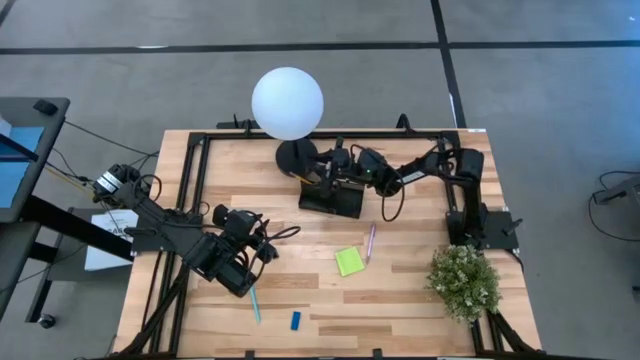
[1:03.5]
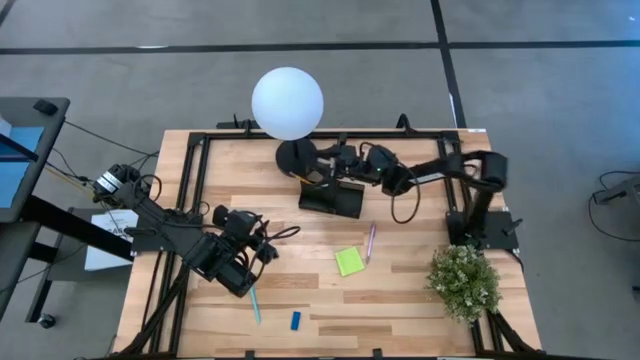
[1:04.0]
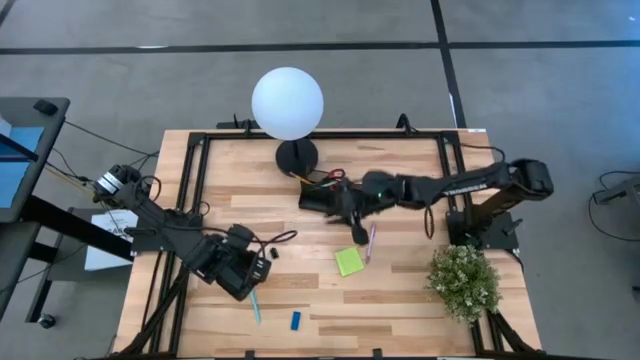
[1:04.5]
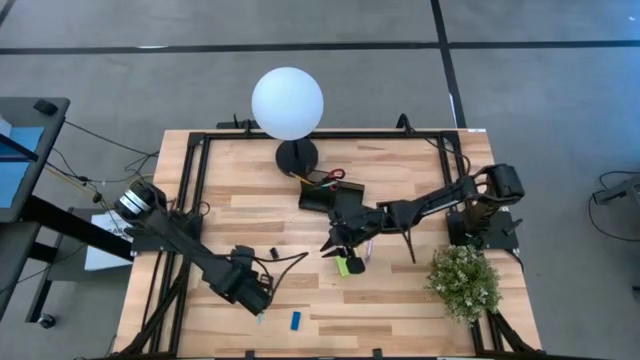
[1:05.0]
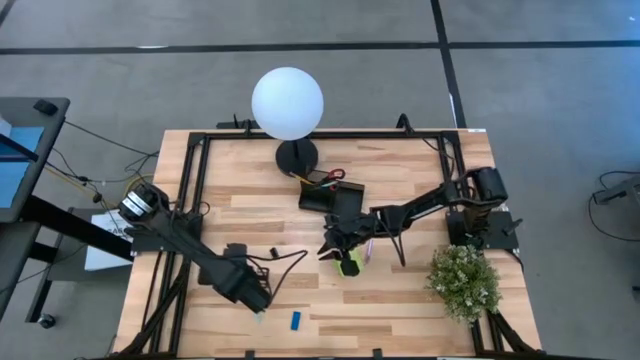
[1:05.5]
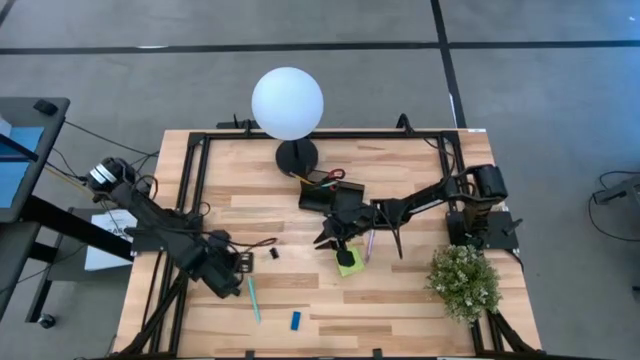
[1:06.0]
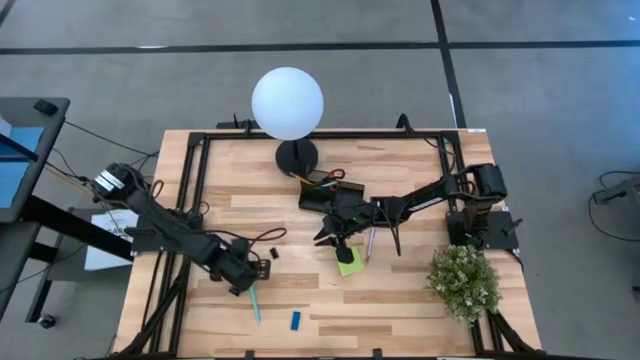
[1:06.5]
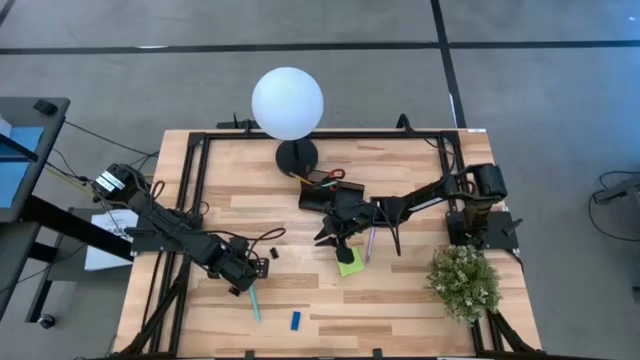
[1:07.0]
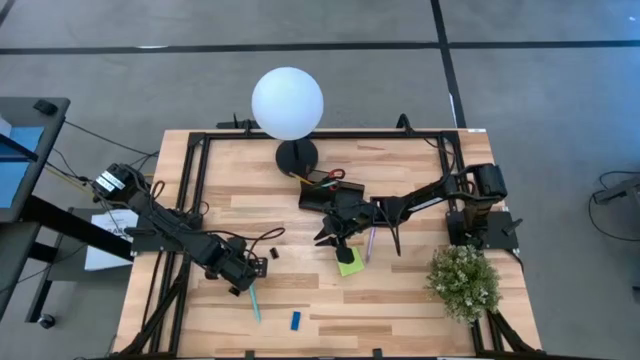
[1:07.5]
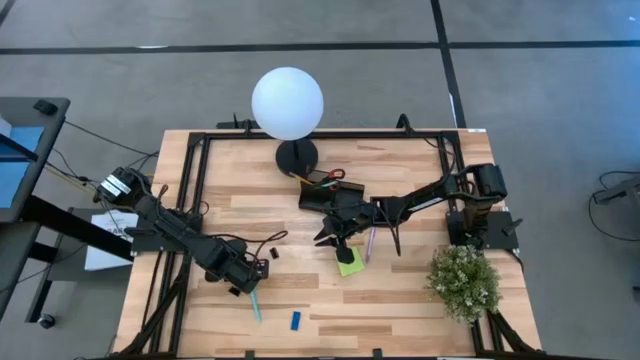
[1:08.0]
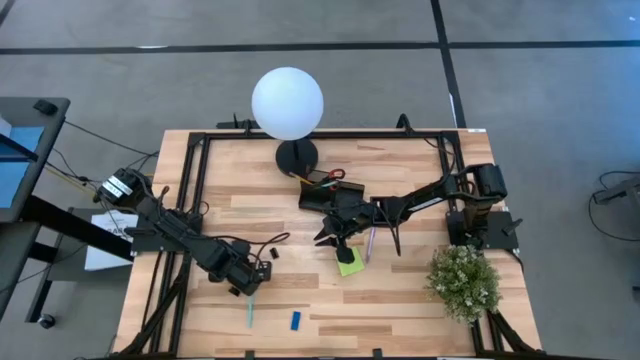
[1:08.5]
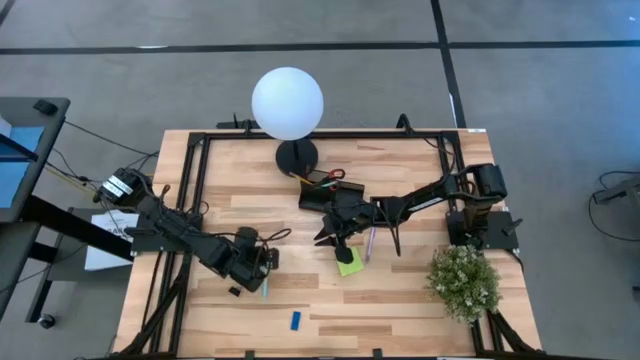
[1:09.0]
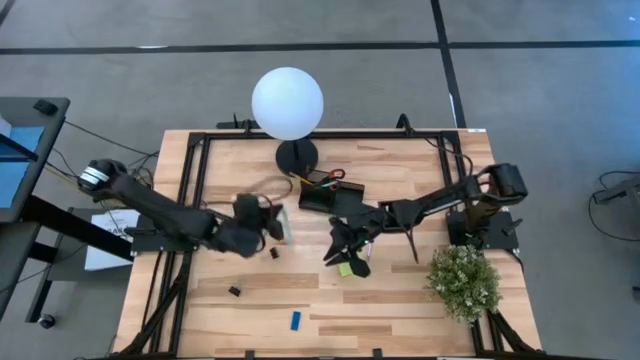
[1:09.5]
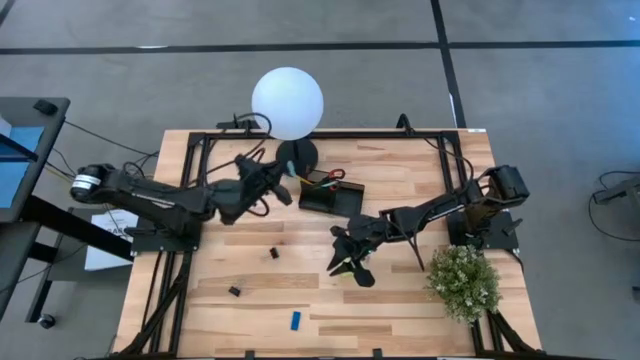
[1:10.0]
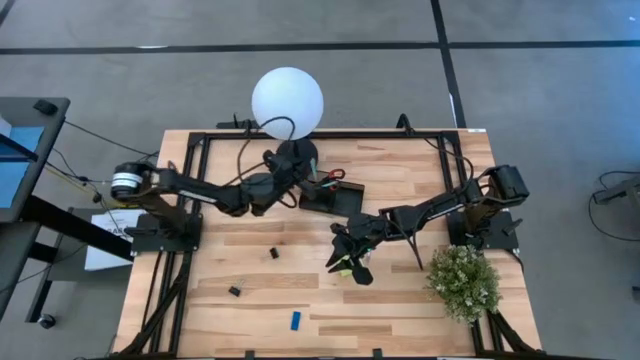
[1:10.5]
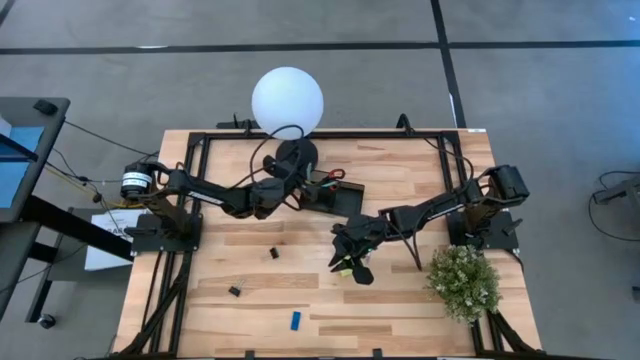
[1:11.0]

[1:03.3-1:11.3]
Task: Pick and place office supplies into organizer
Put the light blue mechanical pencil into the desk organizer

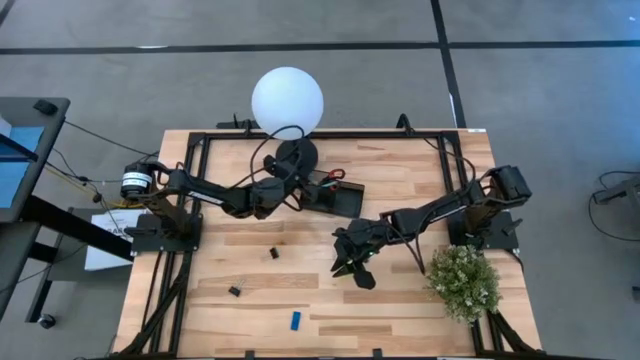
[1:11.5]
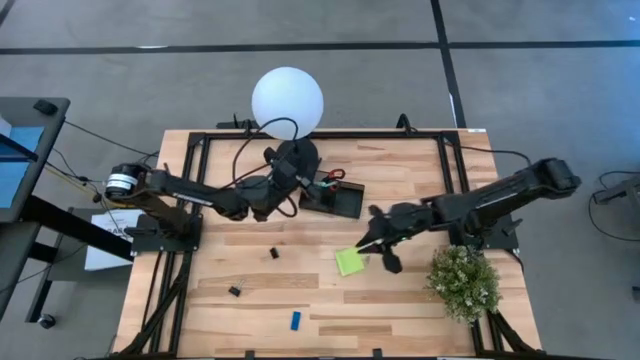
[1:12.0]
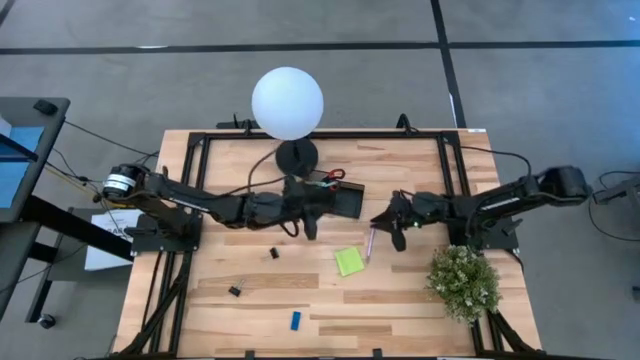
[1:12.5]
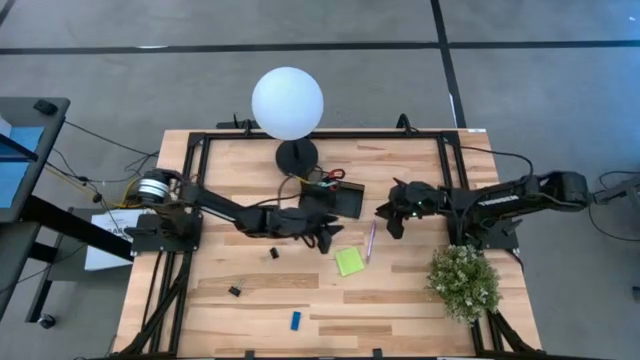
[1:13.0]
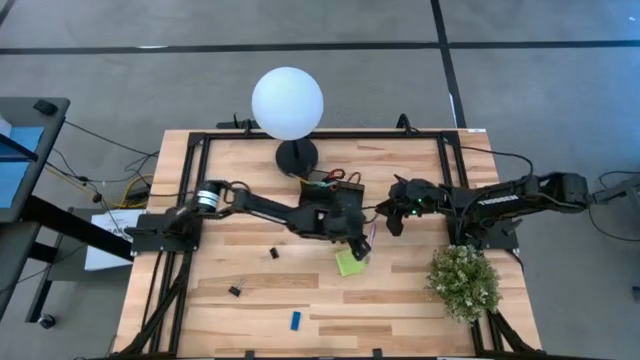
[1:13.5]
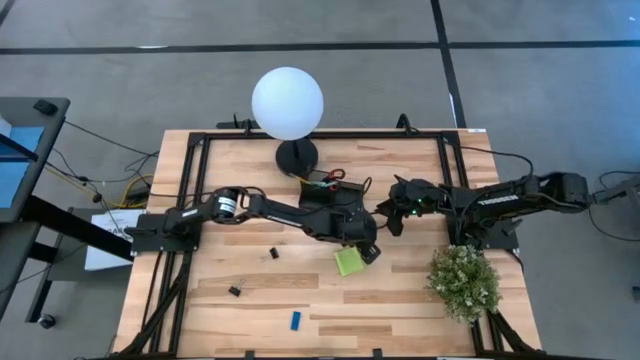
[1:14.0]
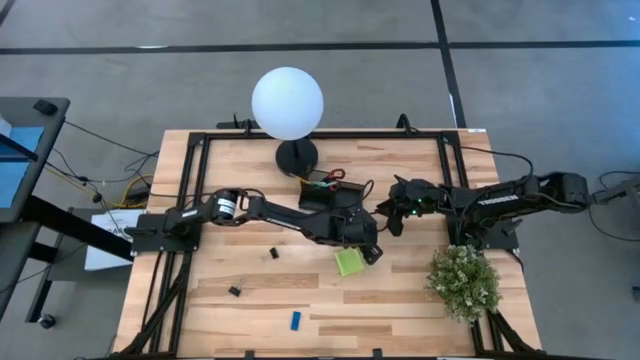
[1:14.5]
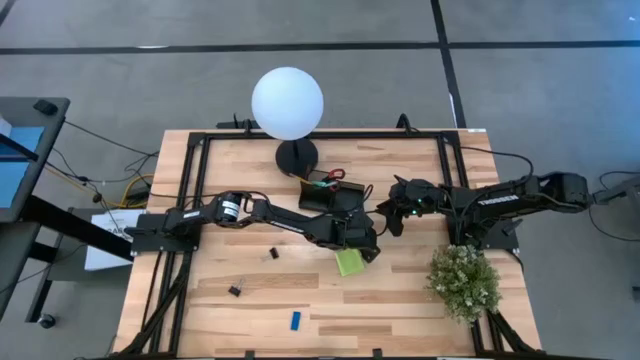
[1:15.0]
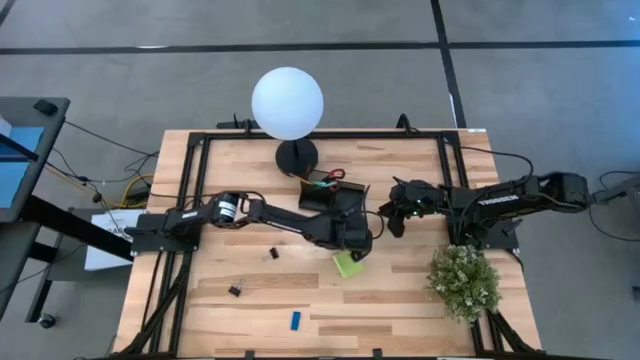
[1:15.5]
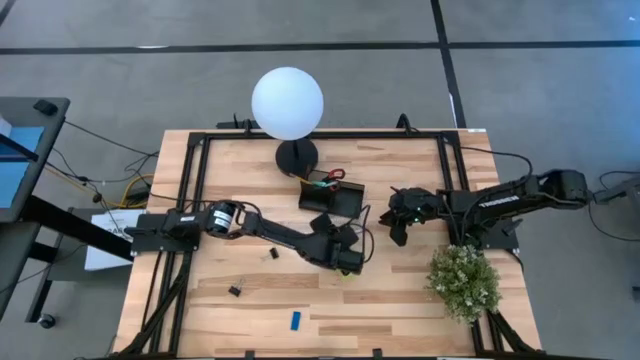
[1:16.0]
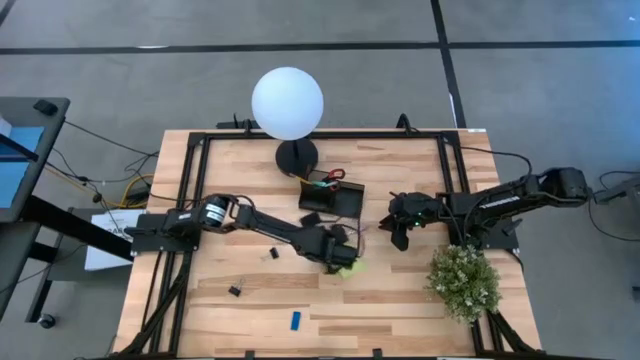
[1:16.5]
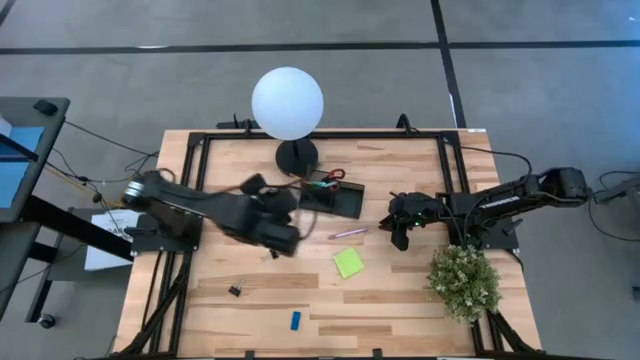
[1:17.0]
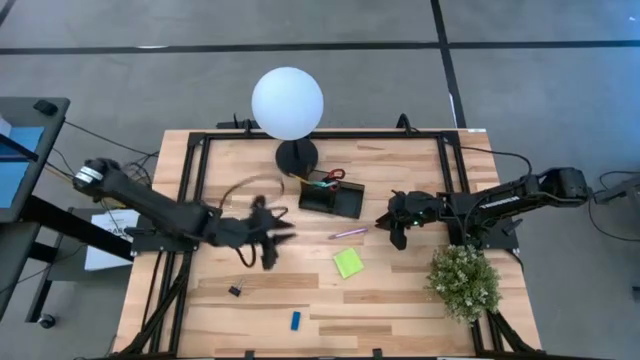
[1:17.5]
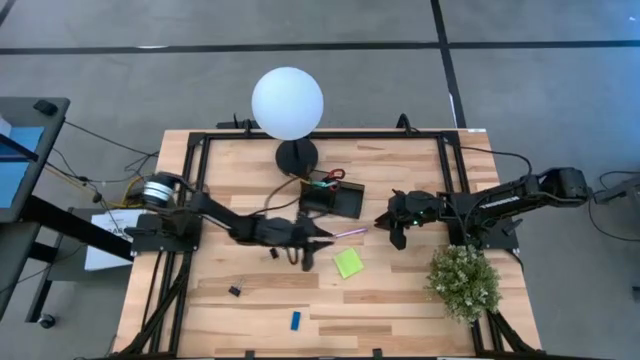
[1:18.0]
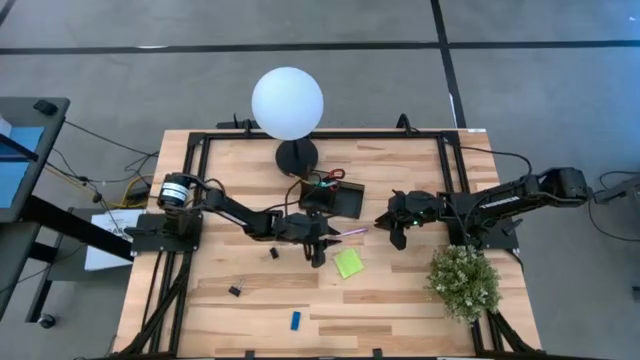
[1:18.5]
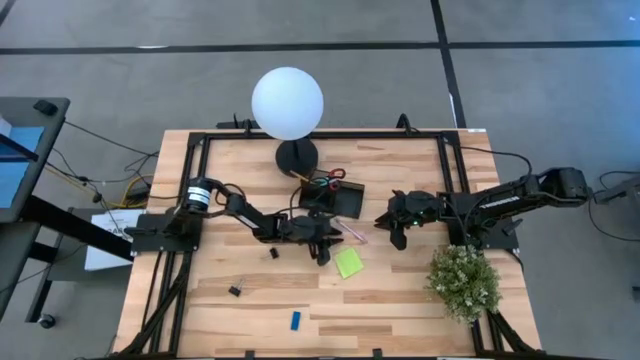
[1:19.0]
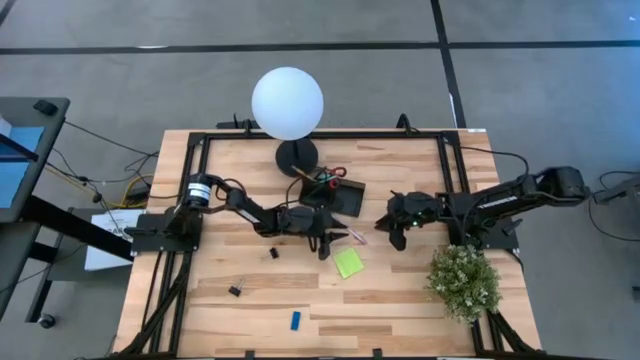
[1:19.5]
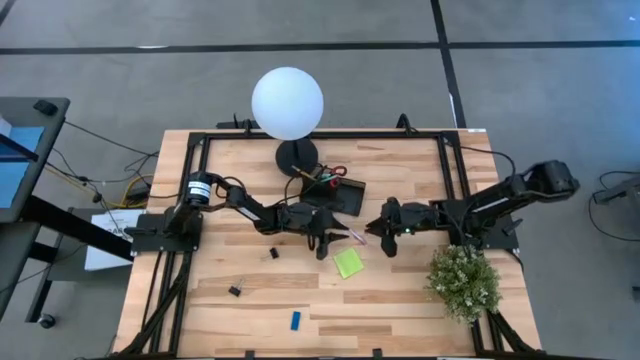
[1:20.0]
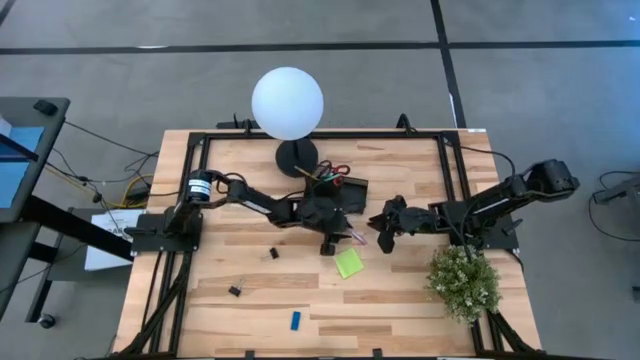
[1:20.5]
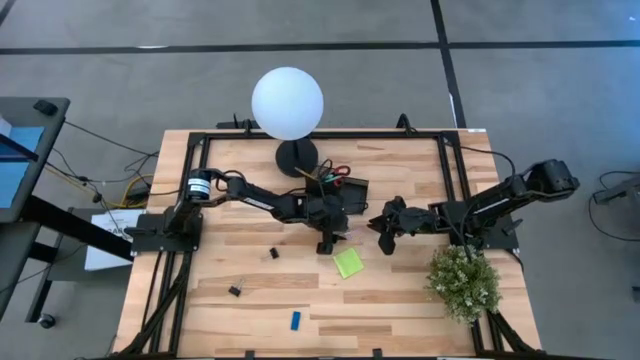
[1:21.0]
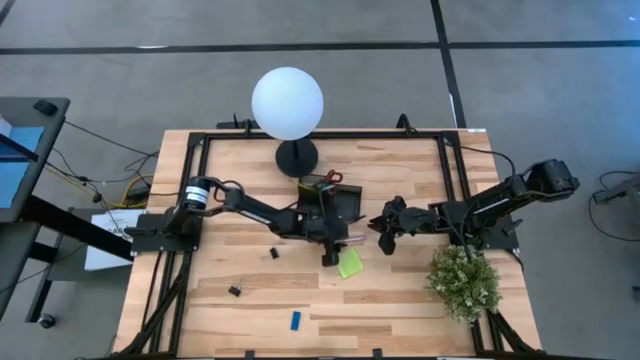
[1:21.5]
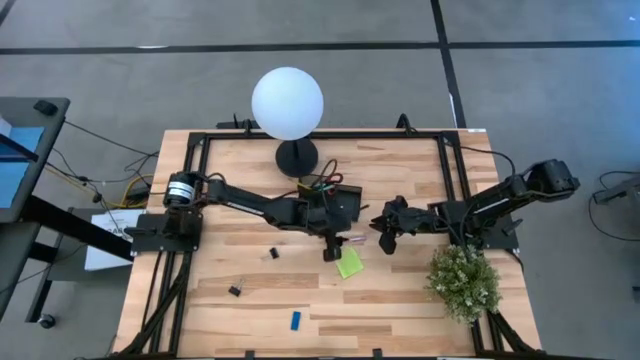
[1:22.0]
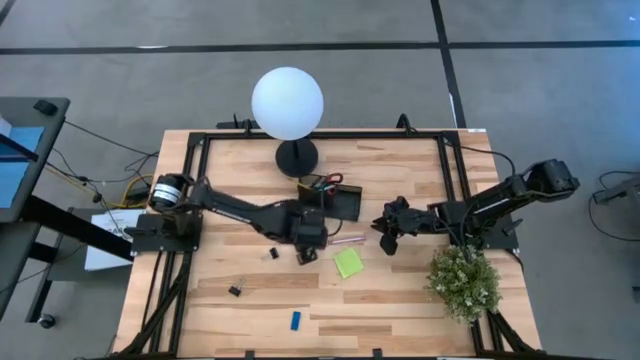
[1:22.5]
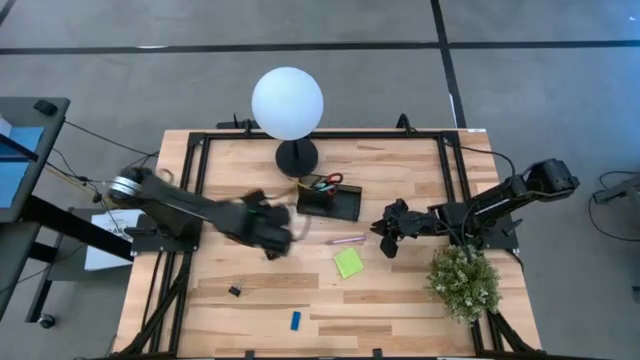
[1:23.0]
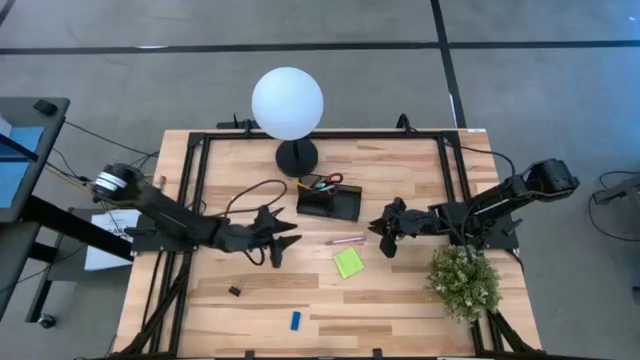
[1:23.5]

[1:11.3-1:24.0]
Put the purple mechanical pencil into the desk organizer

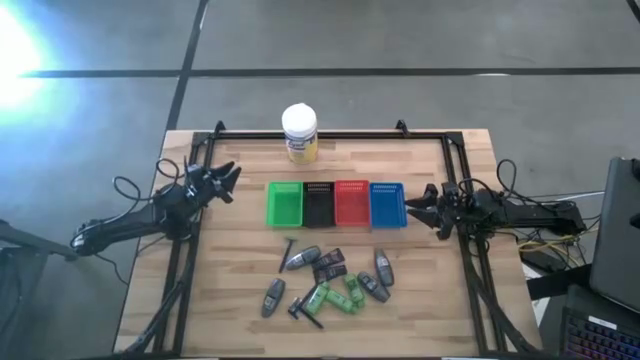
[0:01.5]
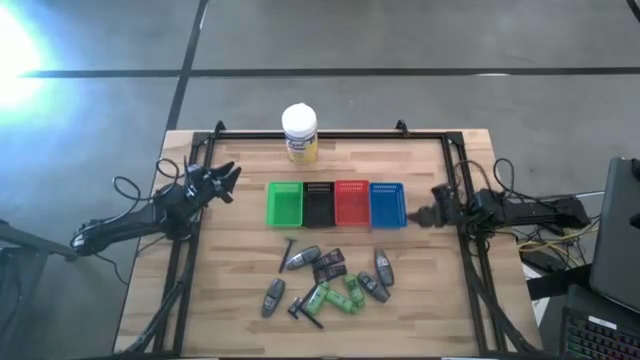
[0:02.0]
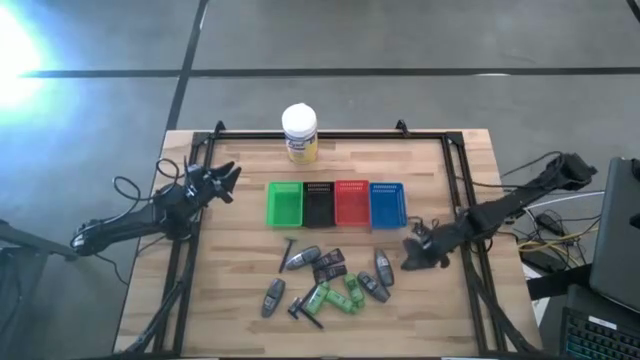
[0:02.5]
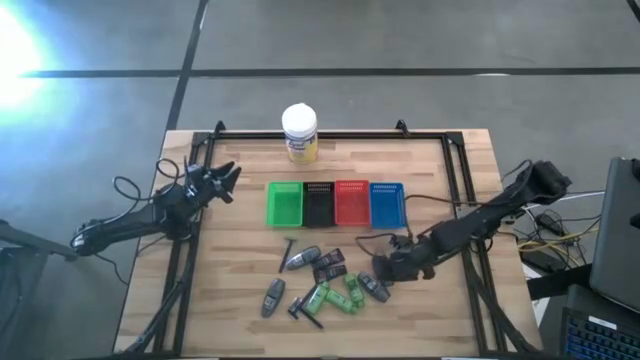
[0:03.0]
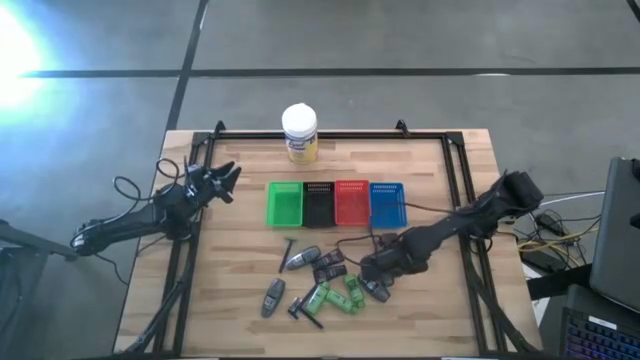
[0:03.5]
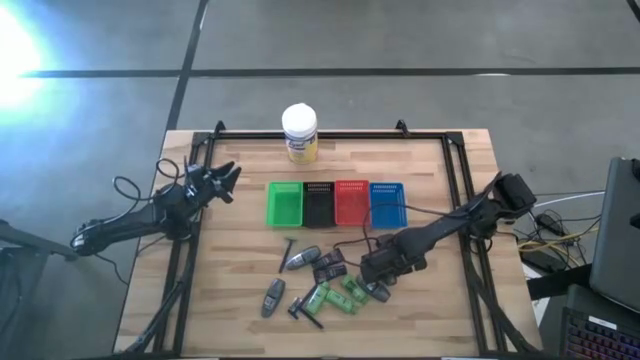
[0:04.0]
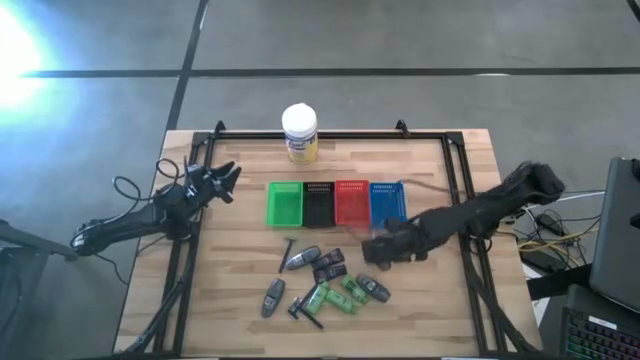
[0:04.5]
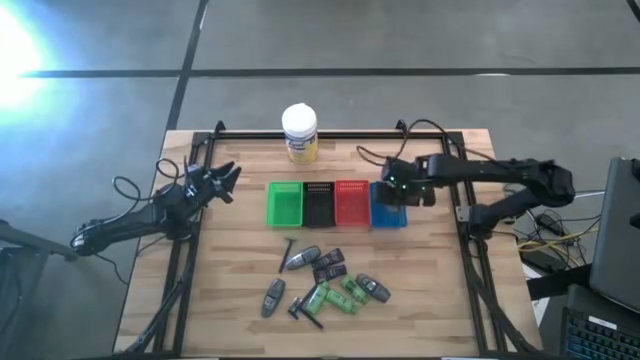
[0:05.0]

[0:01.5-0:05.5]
Task: Pick & Place Travel size toiletries
Put the gray deodorant into the blue bin
